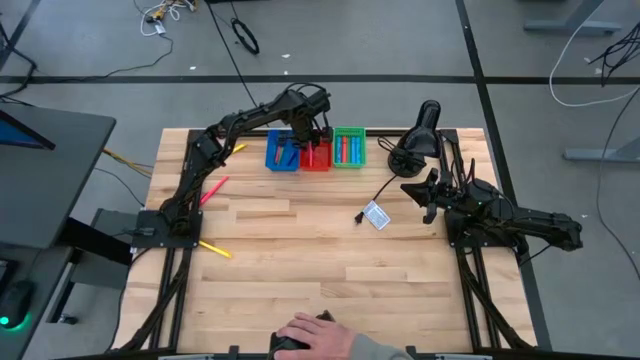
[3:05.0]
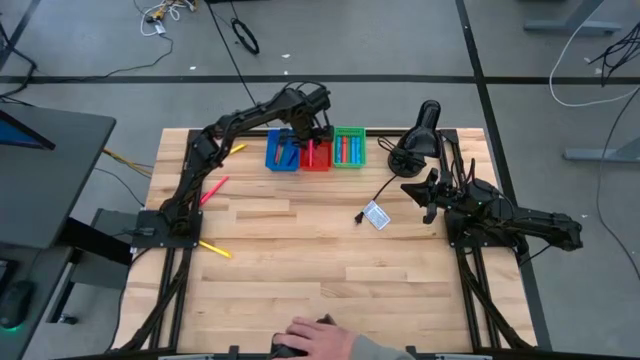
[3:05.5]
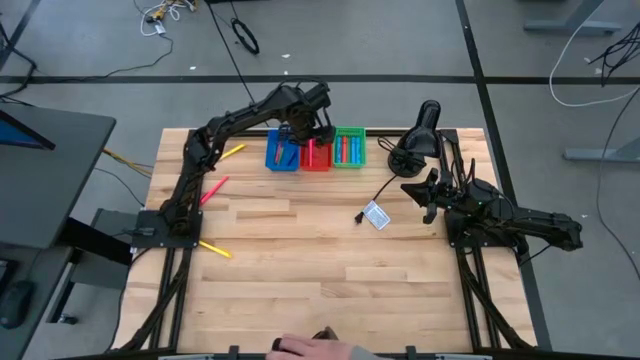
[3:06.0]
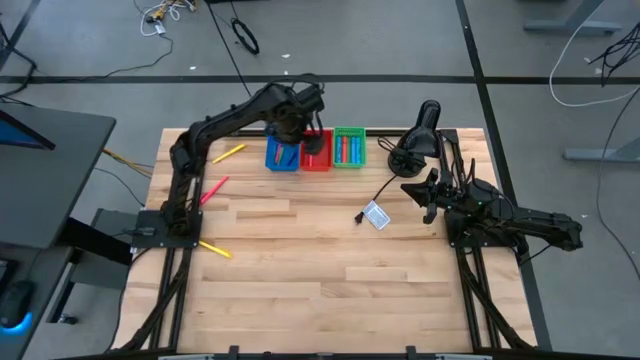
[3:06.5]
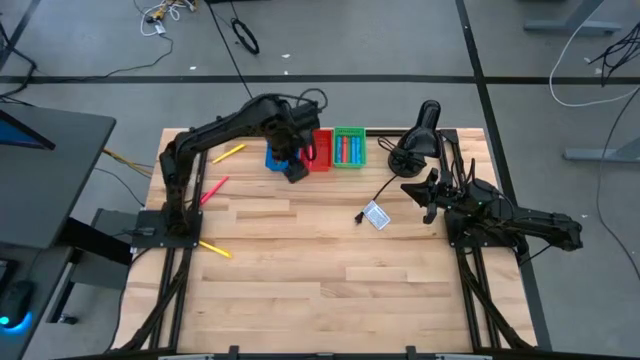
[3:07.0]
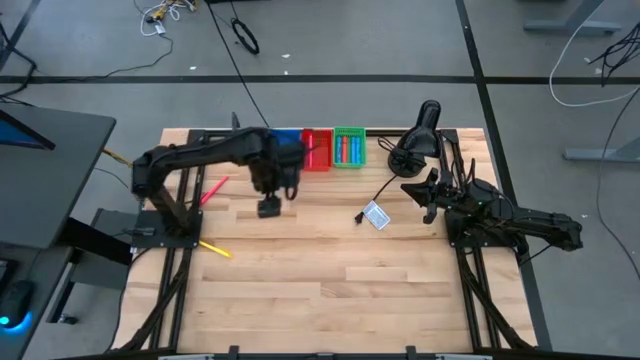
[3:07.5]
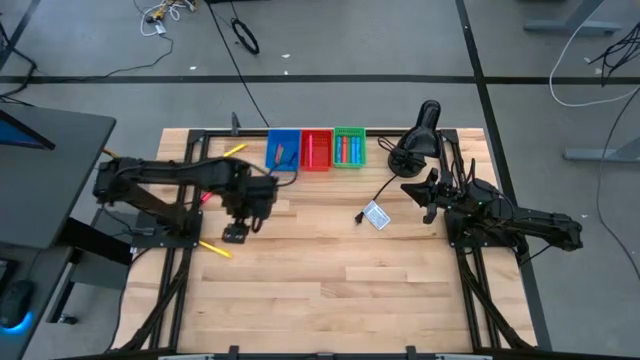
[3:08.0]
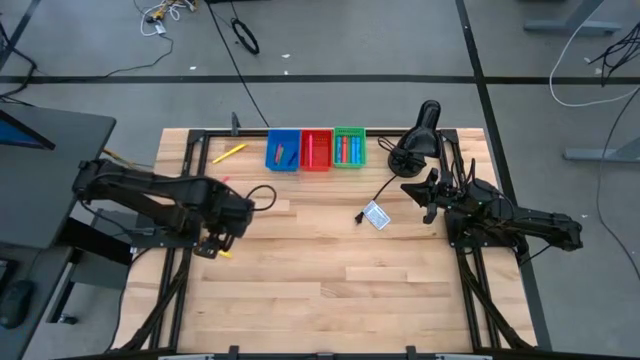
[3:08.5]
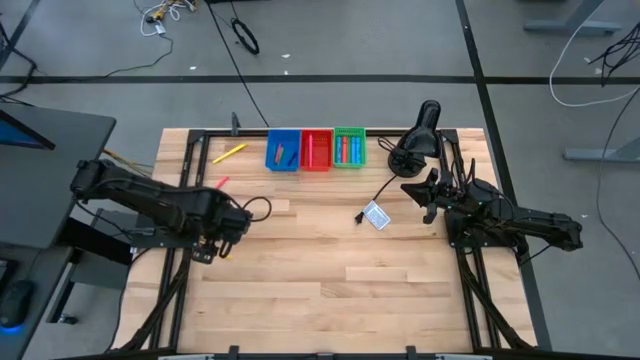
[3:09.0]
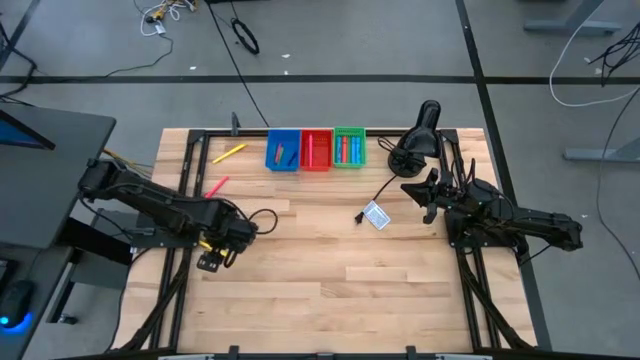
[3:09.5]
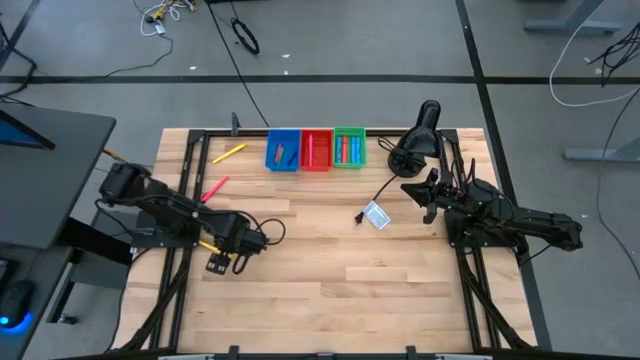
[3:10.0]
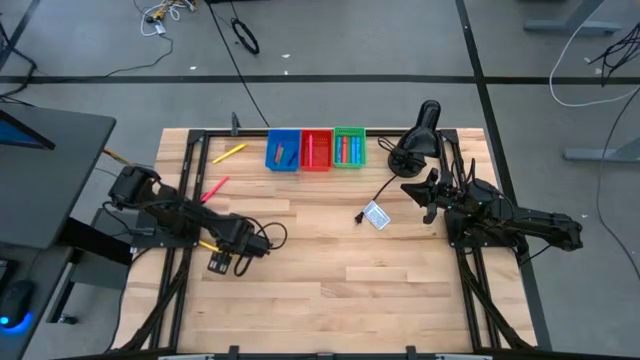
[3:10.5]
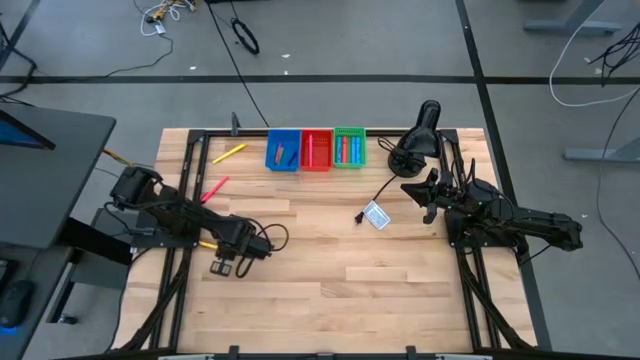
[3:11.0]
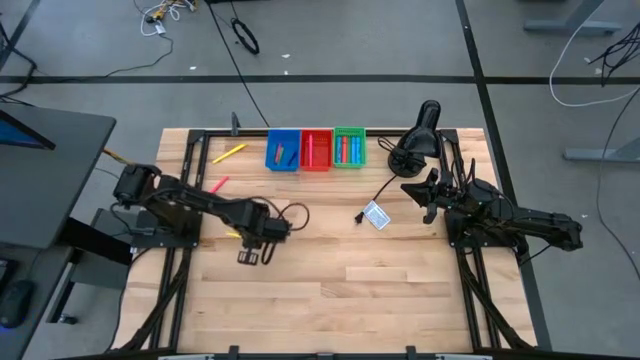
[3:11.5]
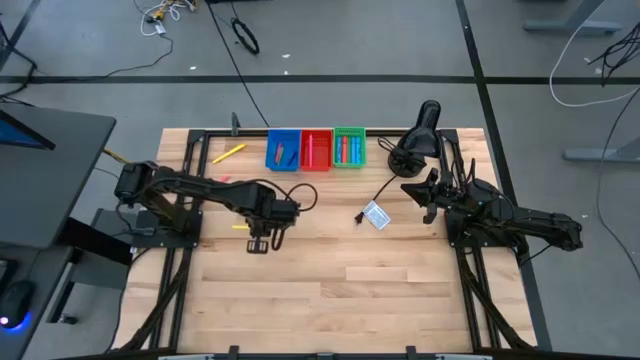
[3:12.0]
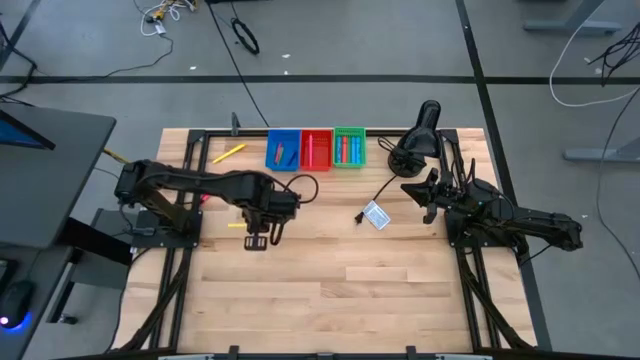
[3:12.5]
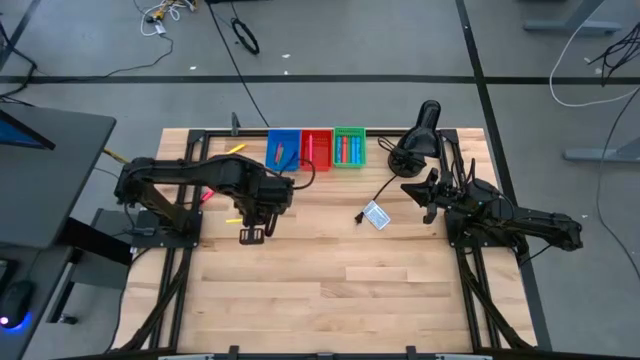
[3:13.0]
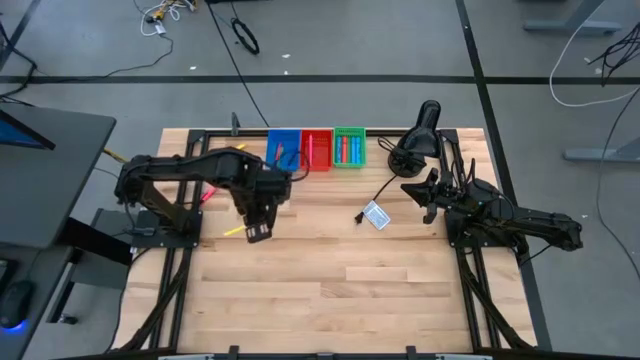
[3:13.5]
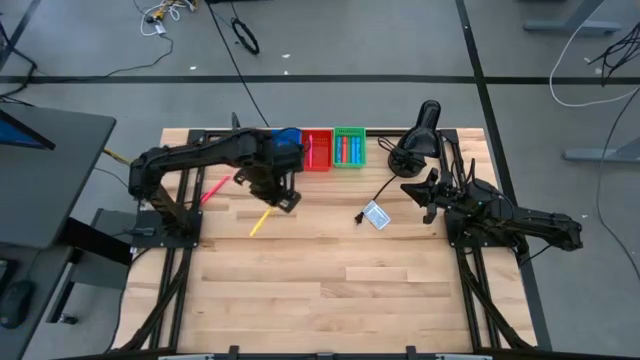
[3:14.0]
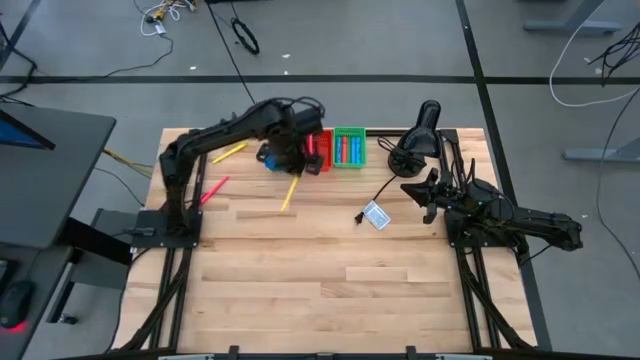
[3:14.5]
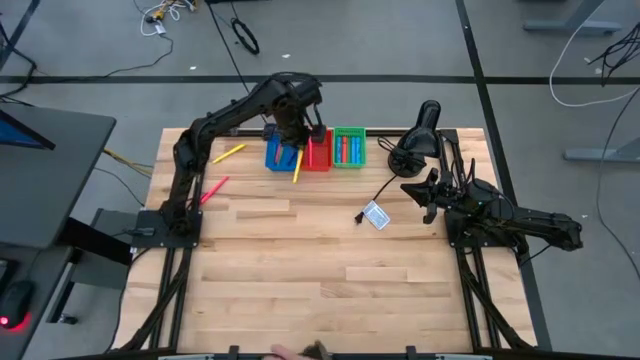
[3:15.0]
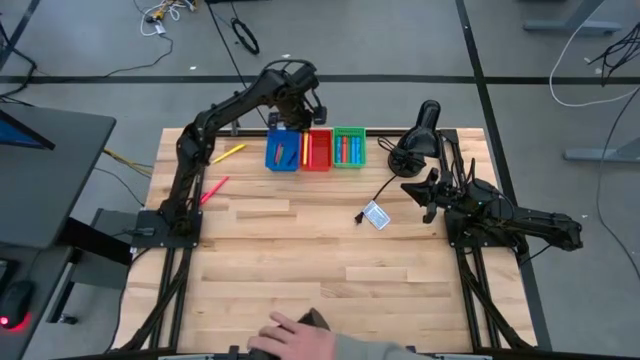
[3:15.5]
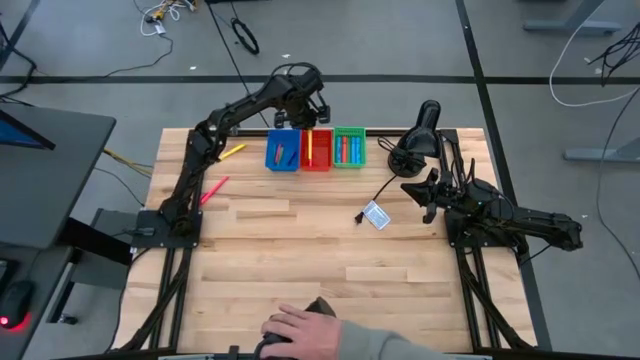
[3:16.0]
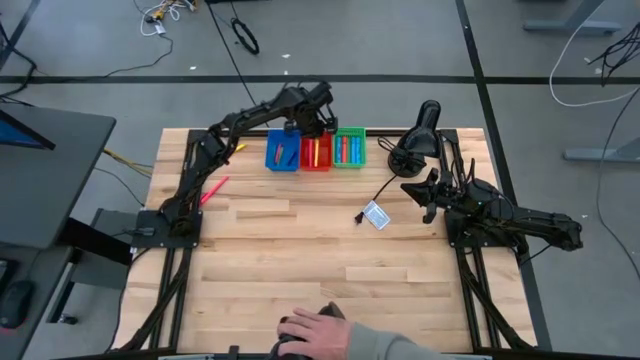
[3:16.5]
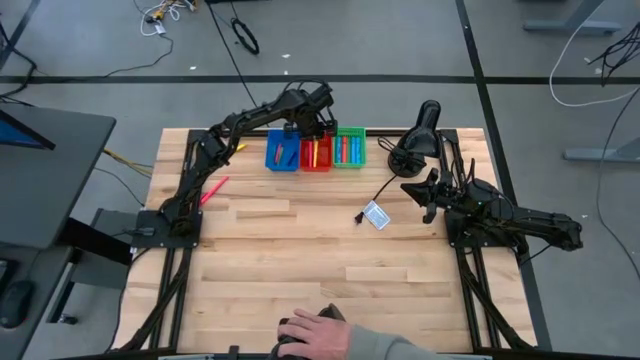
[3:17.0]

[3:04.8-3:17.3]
Task: Pick & Place Markers
Put the bottom yellow marker into the red bin

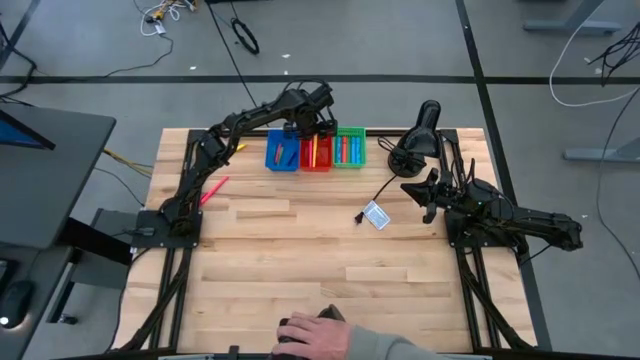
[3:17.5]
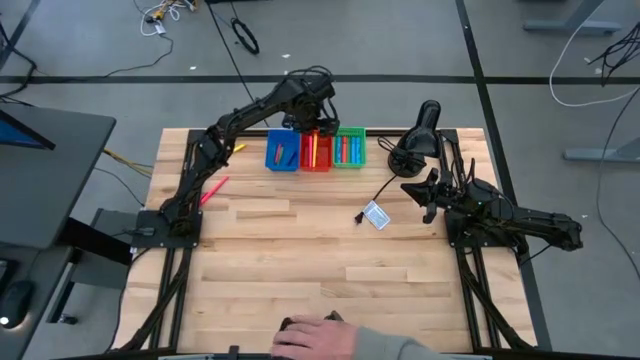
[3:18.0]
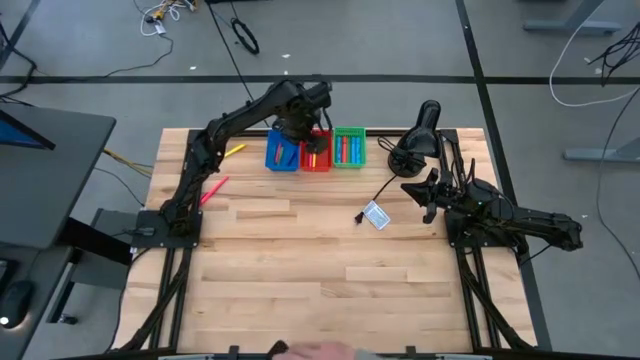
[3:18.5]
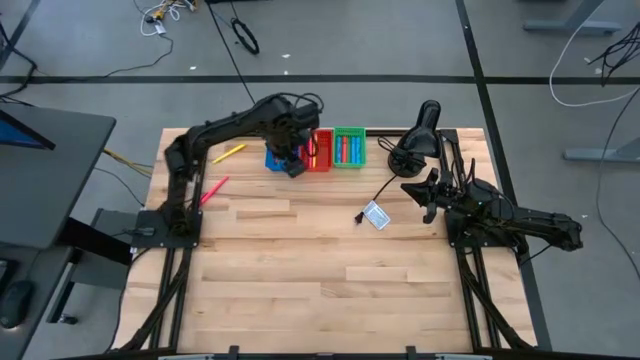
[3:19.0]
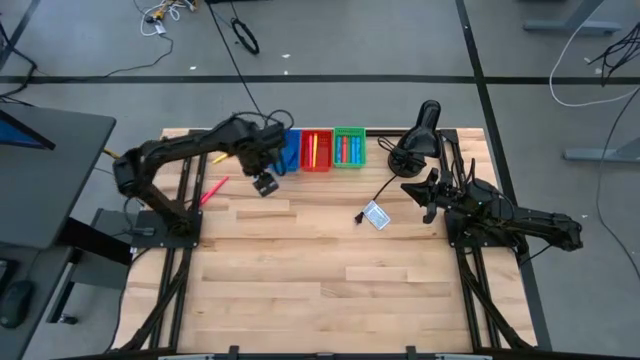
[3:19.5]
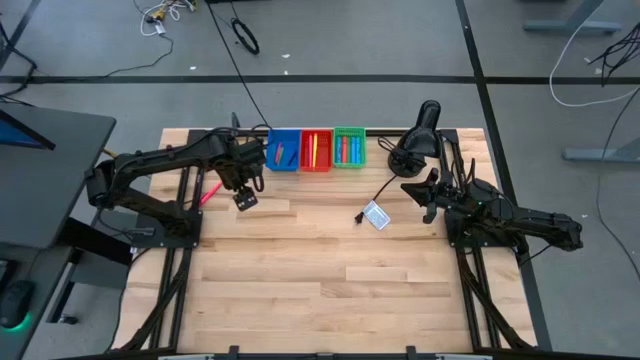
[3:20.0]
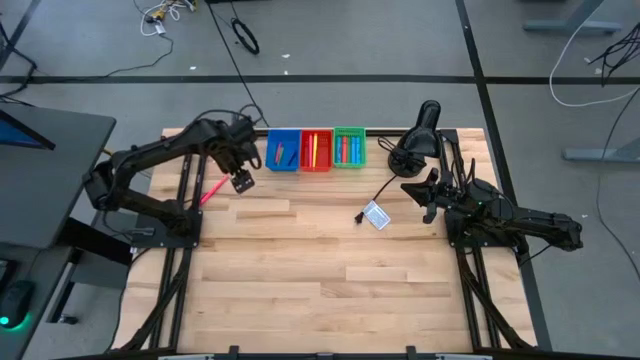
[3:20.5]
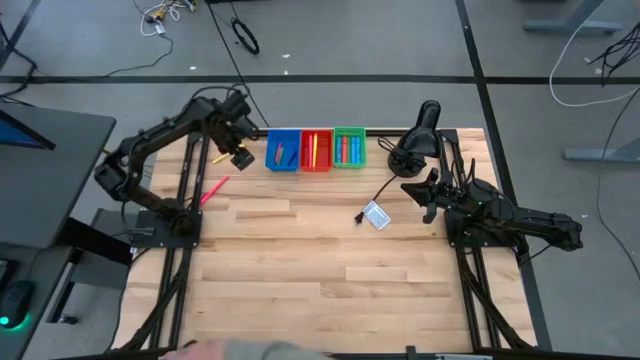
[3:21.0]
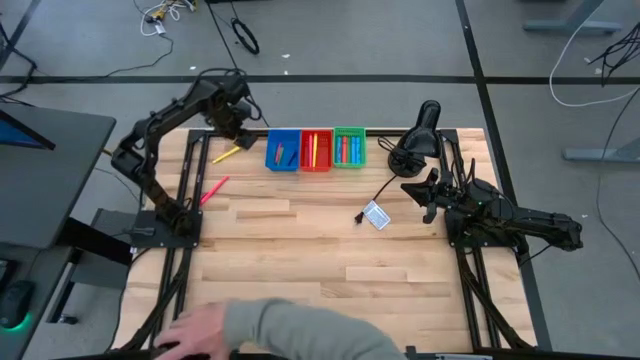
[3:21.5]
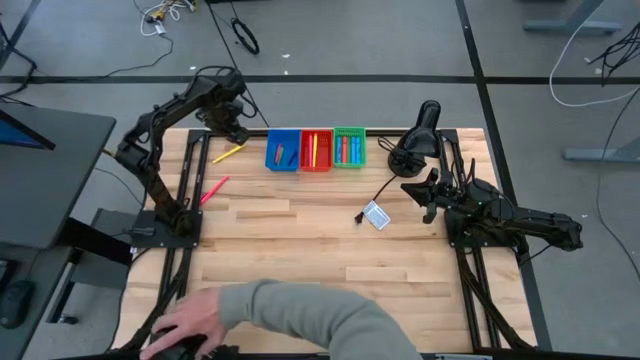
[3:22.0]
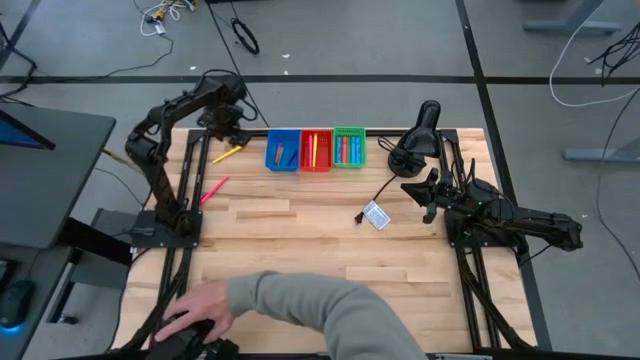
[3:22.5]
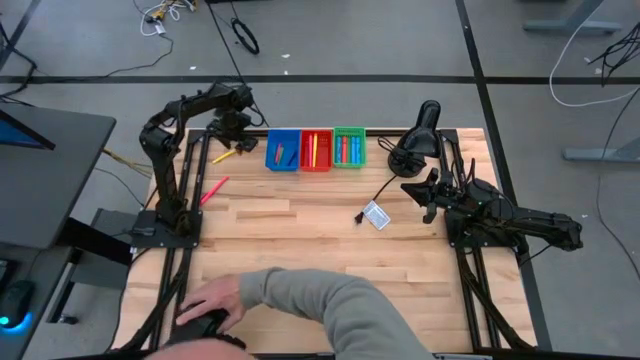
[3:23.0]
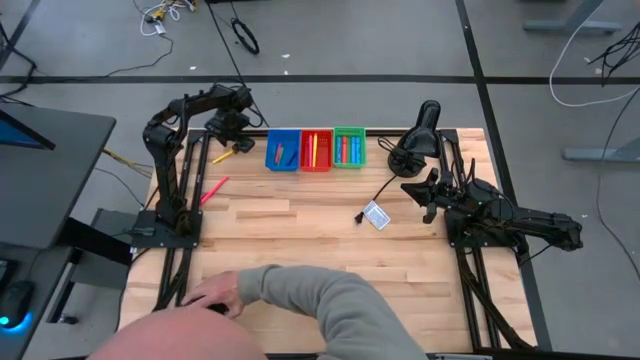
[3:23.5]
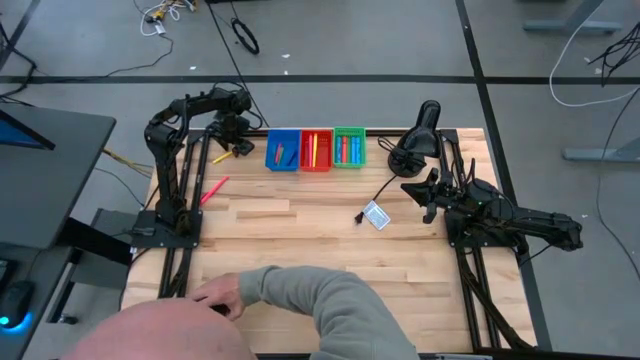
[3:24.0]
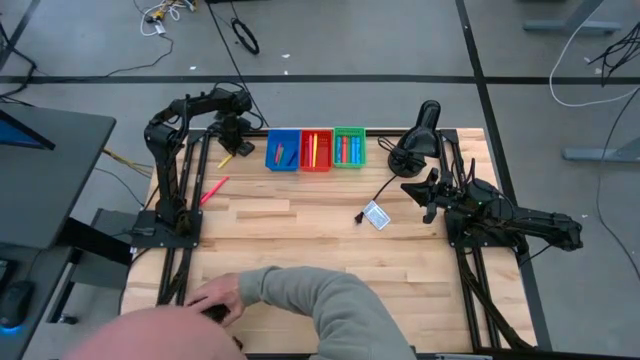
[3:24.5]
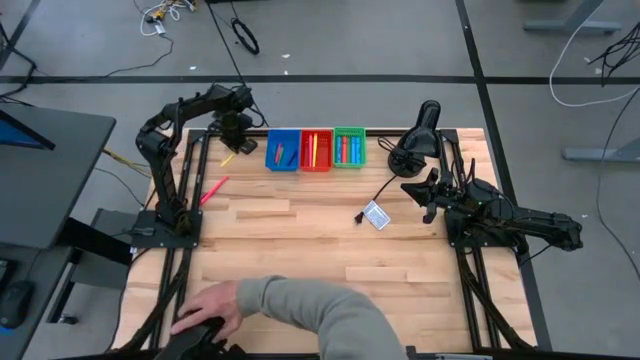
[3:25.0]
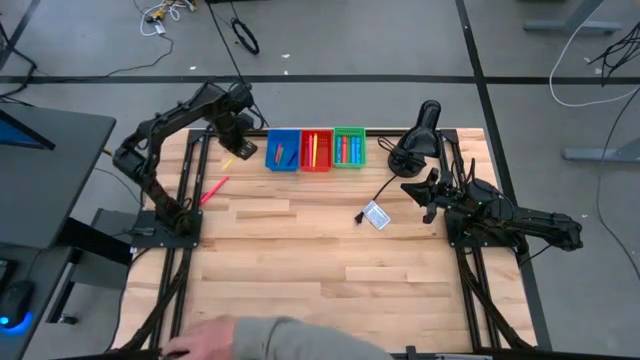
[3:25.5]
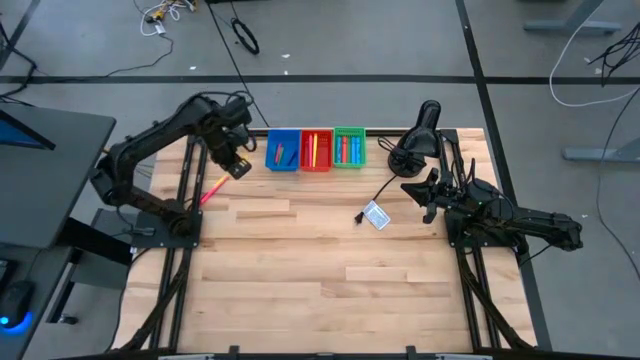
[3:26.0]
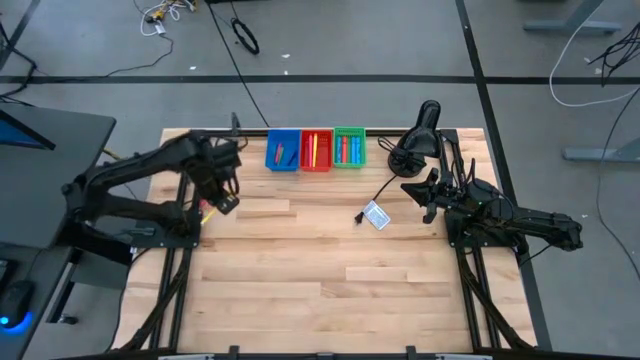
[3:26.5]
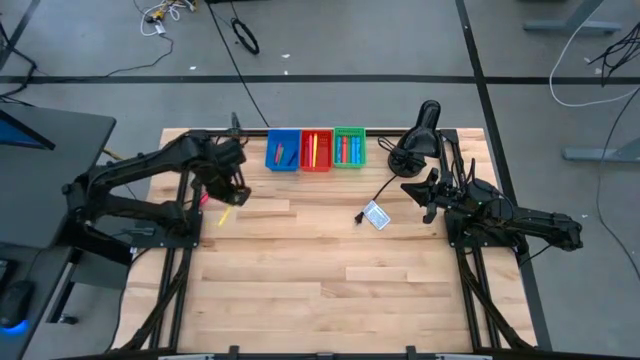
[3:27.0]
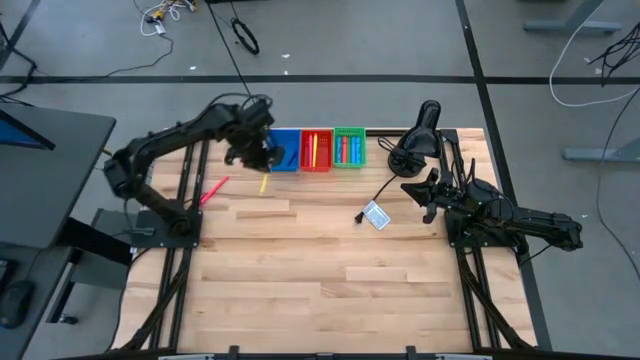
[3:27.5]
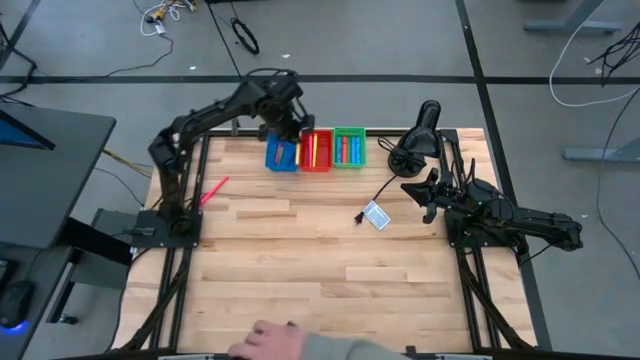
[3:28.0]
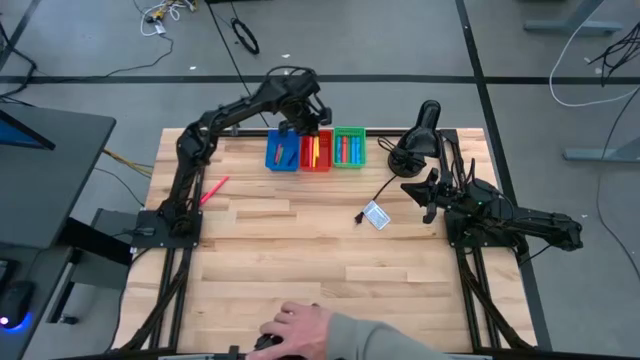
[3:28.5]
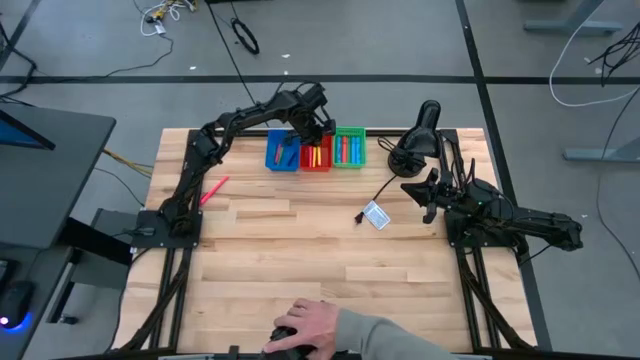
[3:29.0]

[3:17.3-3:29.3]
Put the yellow marker into the red bin
